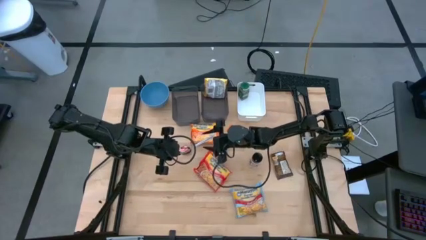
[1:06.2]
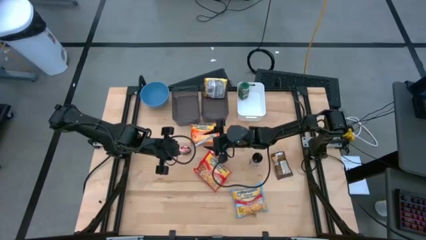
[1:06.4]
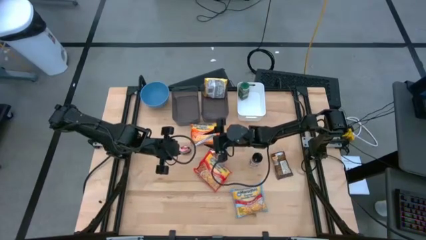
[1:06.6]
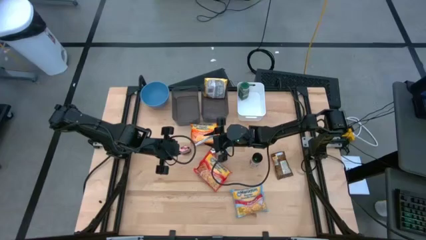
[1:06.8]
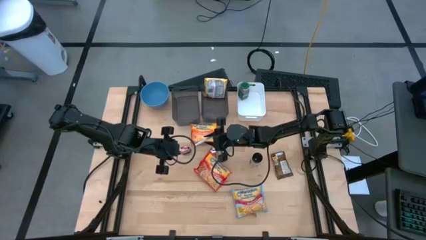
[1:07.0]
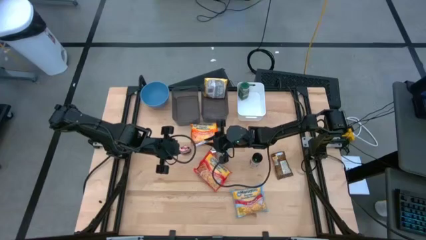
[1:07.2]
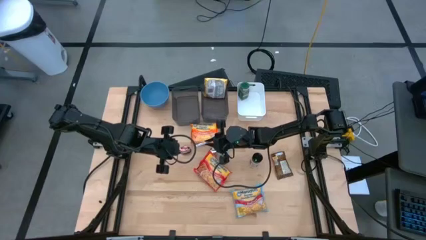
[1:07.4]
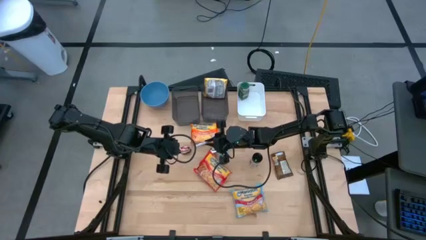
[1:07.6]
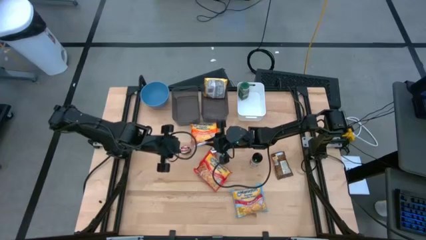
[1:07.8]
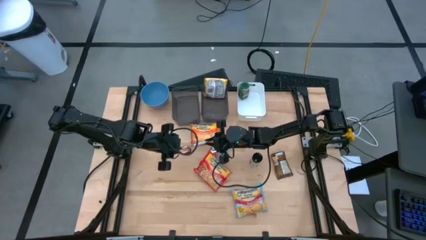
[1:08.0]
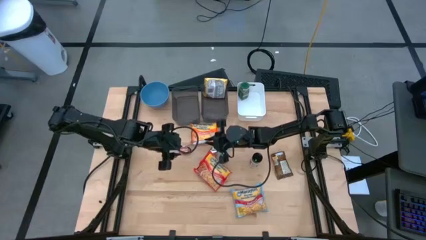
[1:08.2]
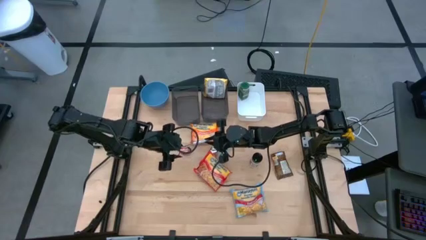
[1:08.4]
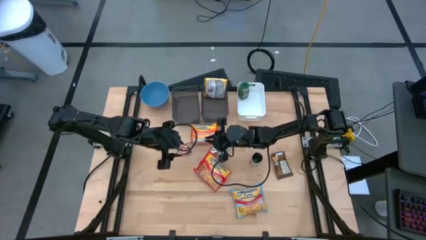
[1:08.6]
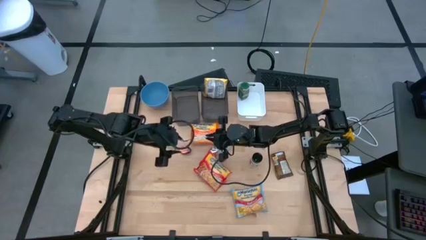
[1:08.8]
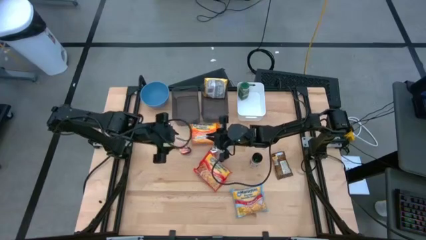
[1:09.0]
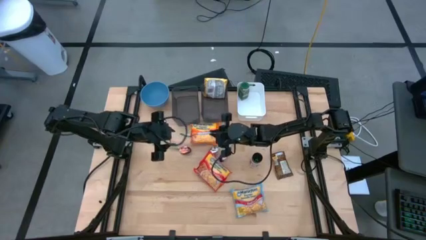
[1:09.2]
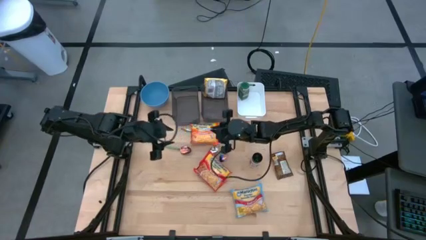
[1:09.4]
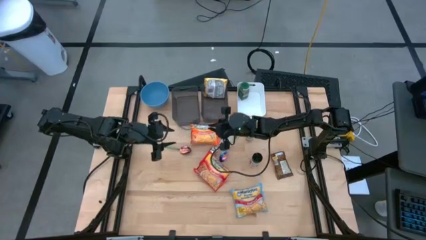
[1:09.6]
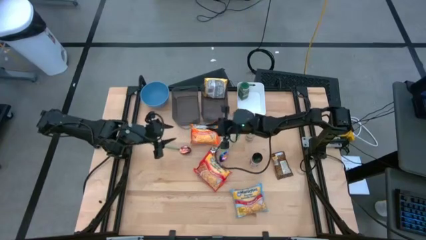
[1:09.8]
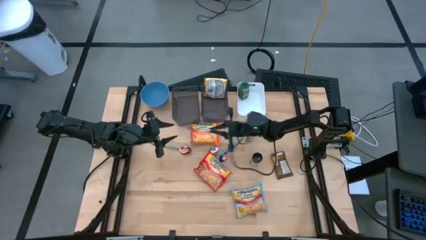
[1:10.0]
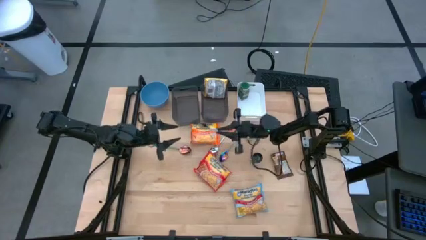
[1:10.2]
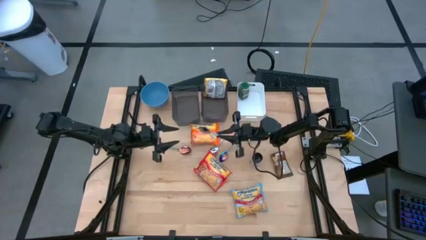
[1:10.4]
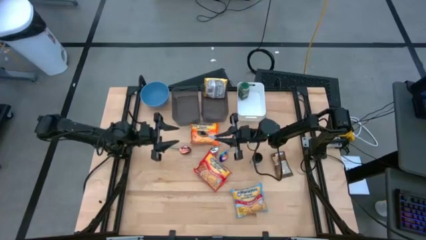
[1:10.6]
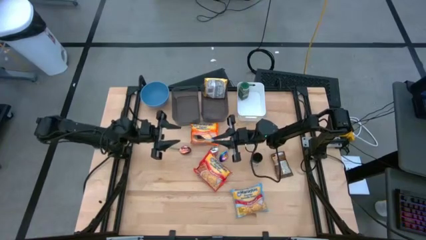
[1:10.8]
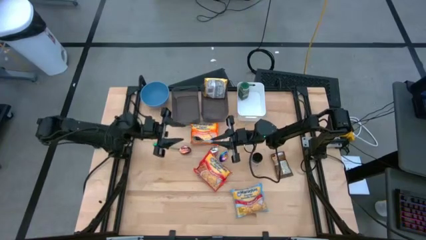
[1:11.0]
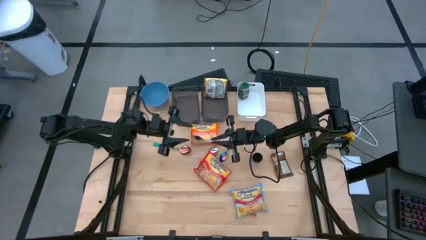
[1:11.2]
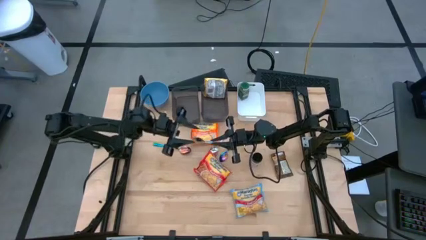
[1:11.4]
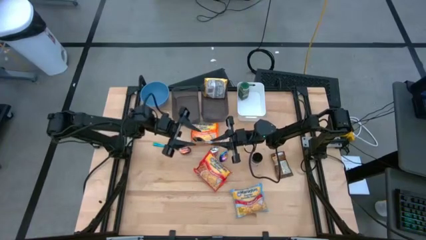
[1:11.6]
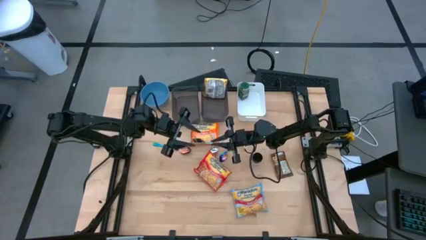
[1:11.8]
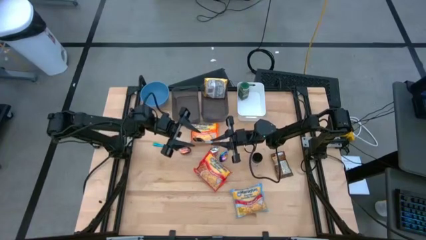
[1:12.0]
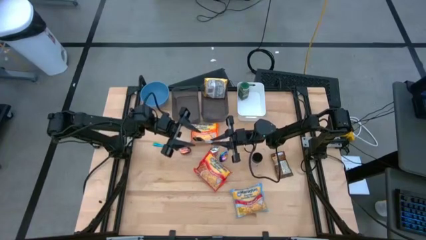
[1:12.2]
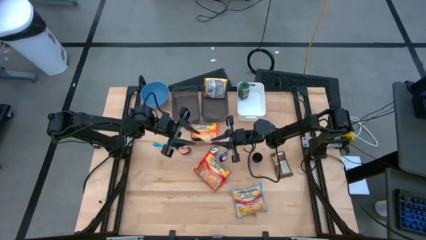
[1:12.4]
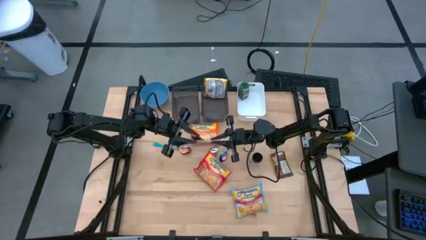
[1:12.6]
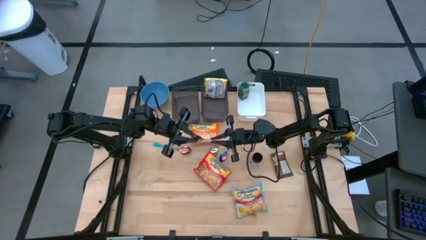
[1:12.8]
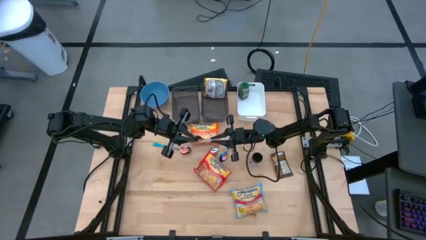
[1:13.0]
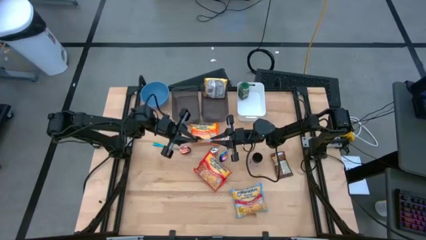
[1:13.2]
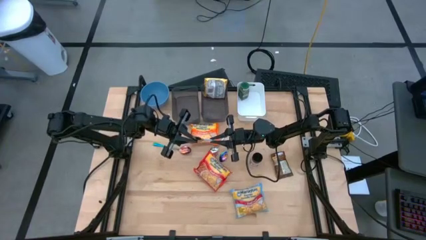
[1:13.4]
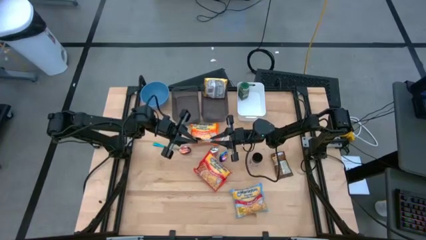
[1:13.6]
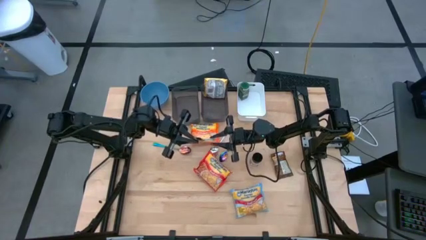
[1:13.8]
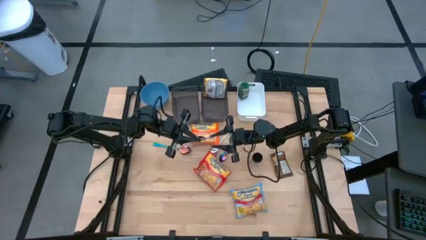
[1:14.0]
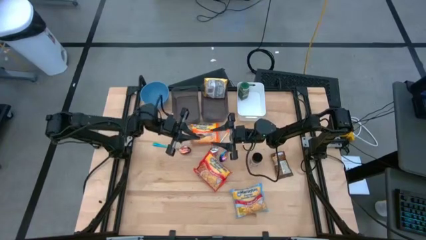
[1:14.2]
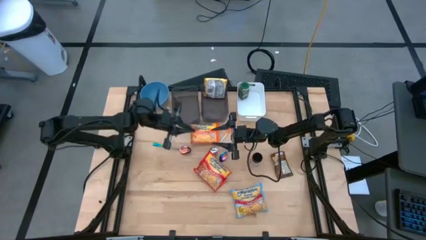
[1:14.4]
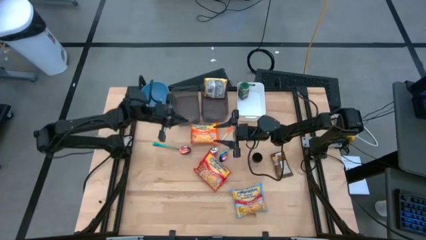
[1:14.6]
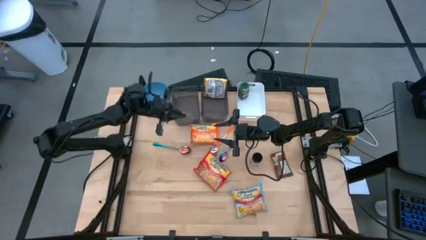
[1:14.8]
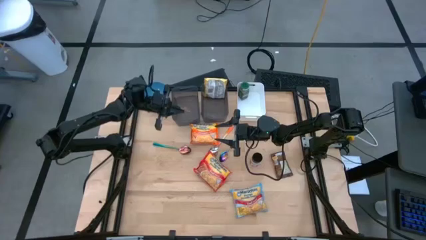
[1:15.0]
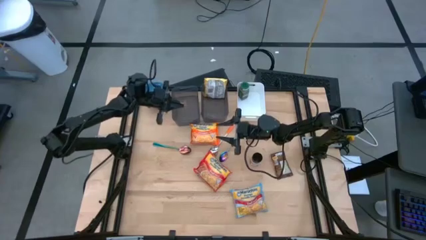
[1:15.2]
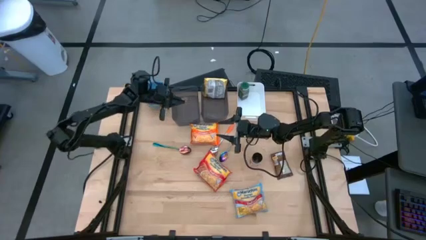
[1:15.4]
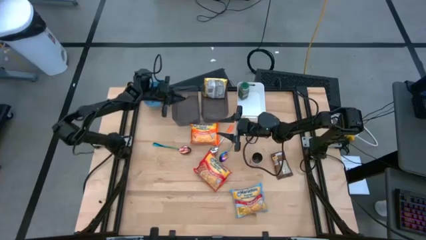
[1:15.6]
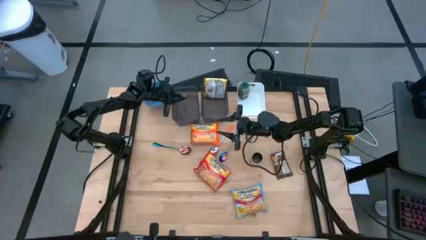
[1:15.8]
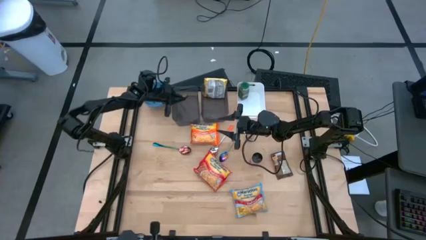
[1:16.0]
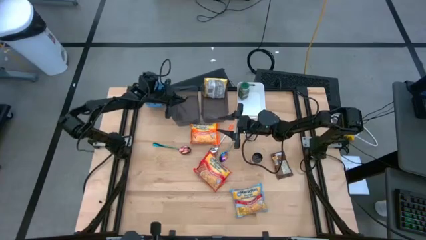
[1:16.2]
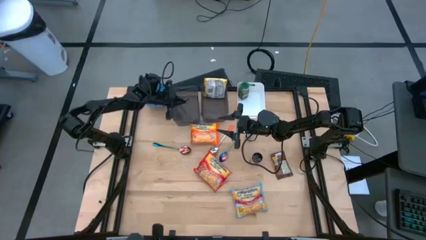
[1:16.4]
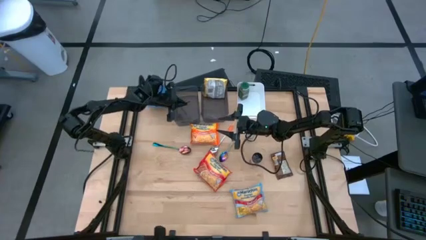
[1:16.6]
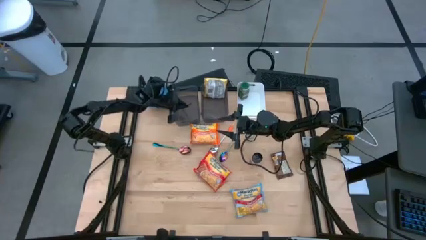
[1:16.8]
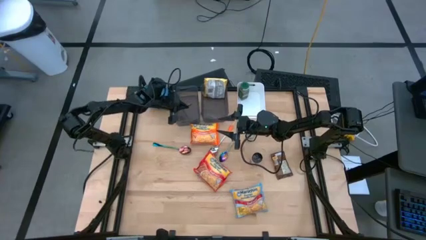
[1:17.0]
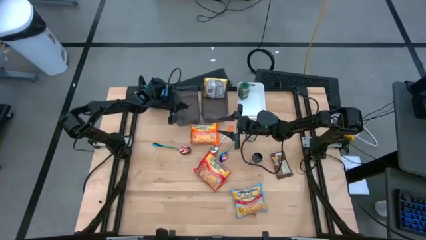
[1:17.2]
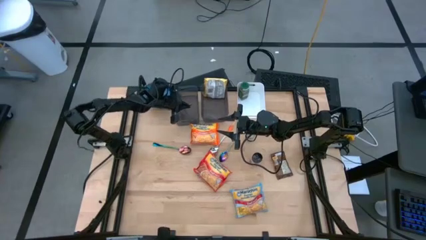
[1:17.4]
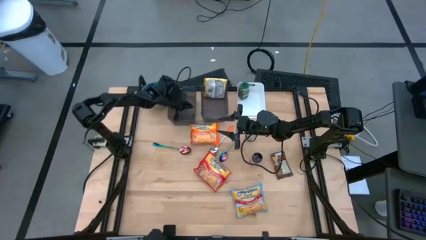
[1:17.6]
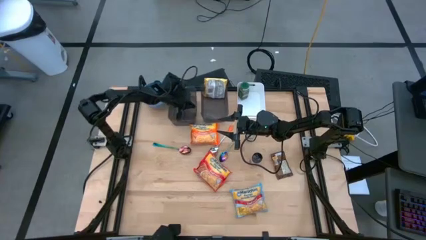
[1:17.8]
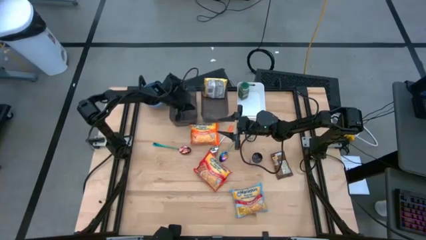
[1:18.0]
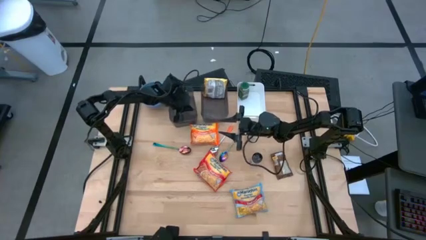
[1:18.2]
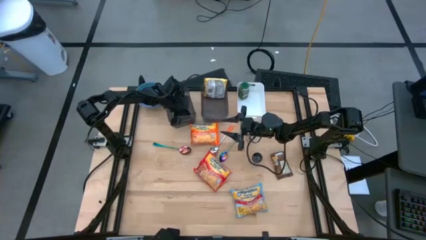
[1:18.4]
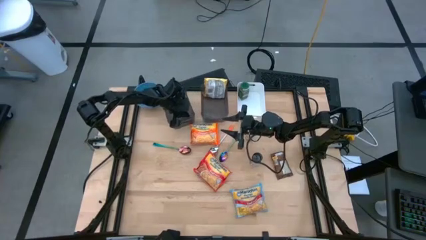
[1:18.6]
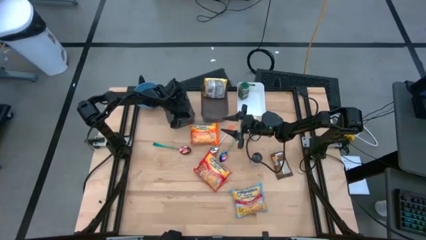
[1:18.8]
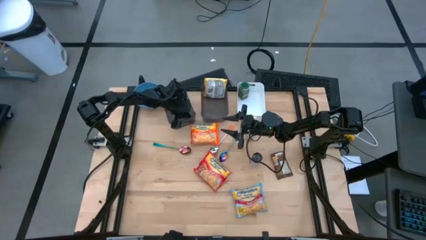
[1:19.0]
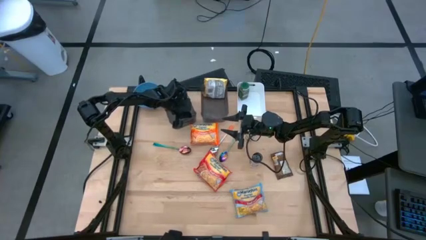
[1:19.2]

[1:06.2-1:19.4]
Task: Pick & Place Food Item
Put the blue patterned spoon into the left black bin

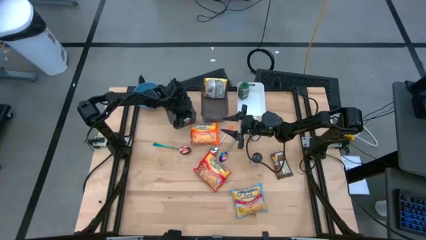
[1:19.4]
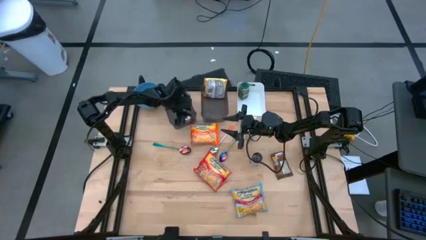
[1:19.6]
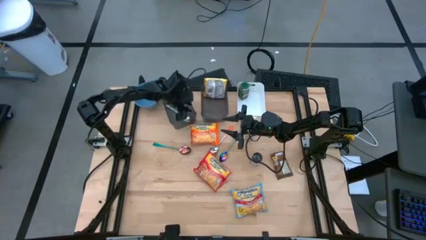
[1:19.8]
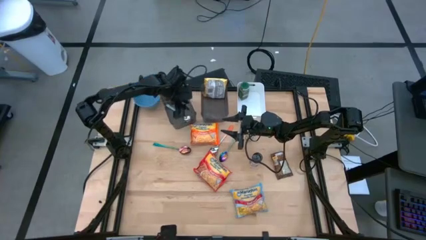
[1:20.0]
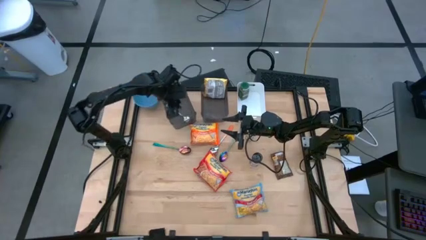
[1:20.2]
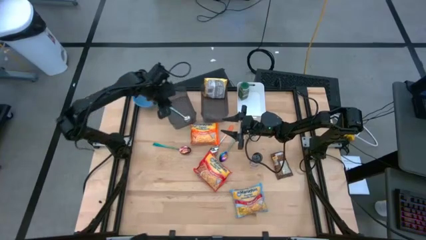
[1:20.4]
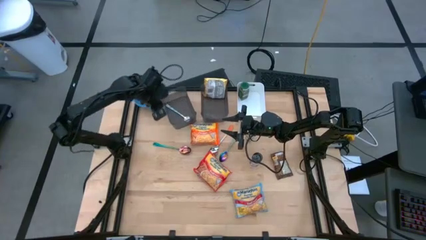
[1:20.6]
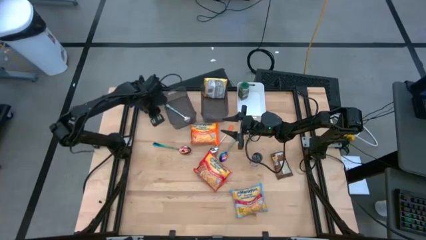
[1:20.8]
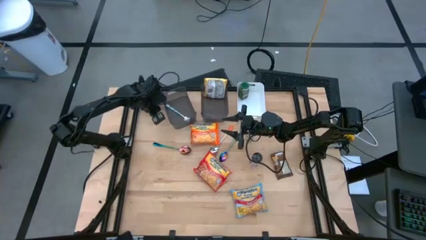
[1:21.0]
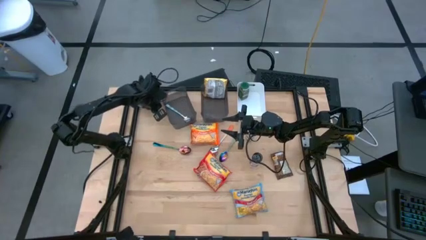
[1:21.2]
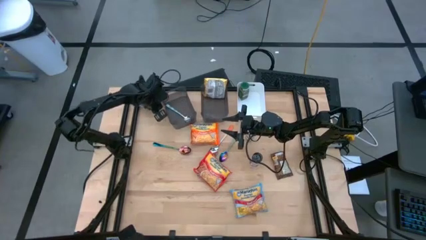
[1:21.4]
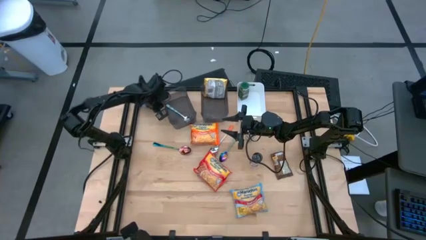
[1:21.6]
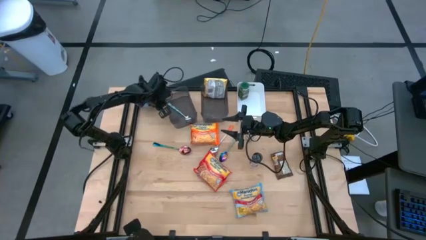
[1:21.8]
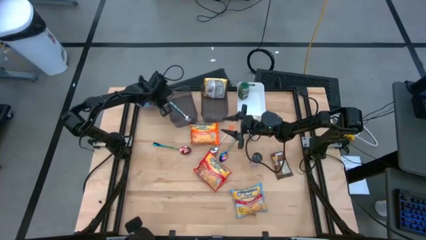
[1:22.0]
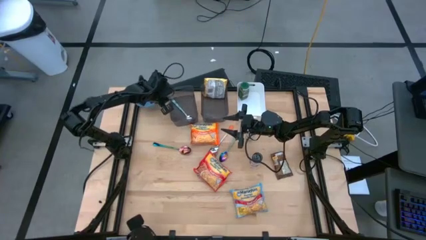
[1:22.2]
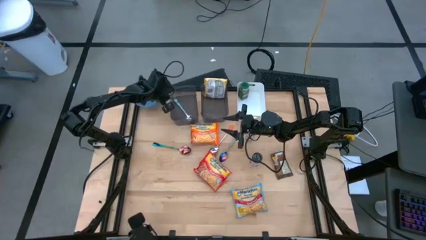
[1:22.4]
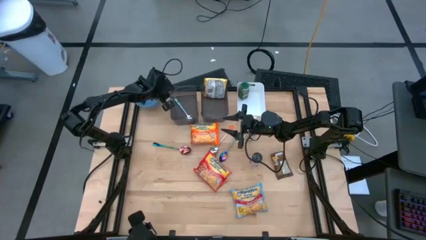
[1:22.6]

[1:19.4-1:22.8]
Adjust the left black bin
